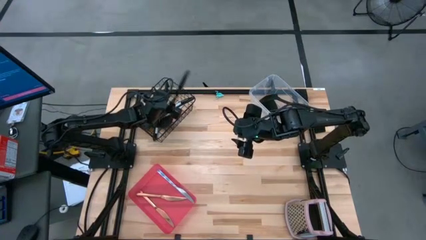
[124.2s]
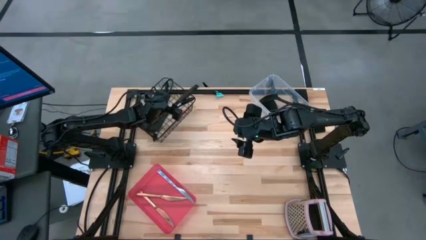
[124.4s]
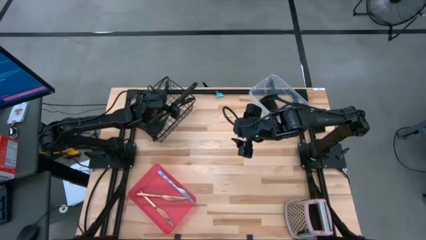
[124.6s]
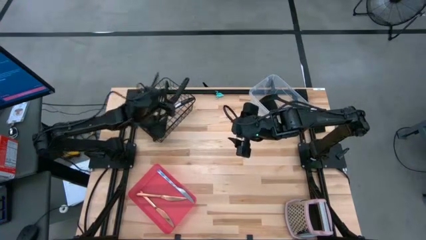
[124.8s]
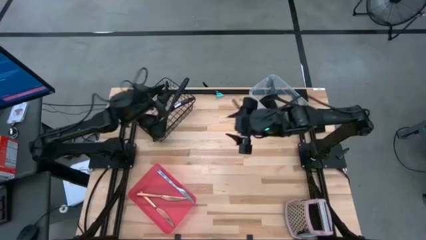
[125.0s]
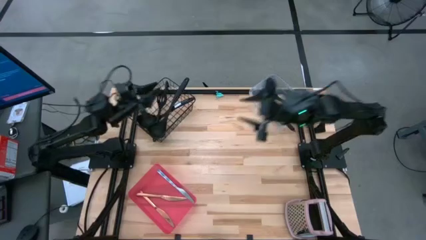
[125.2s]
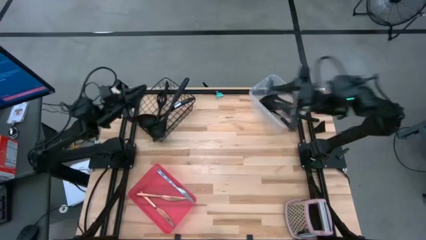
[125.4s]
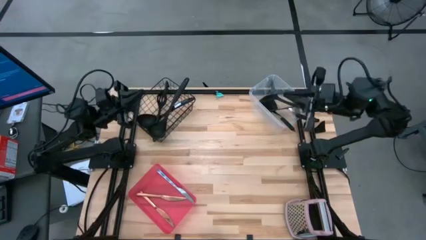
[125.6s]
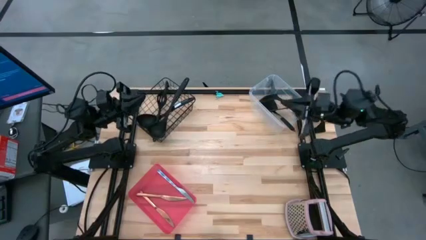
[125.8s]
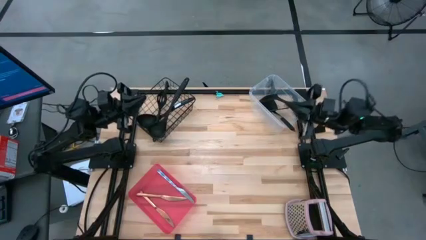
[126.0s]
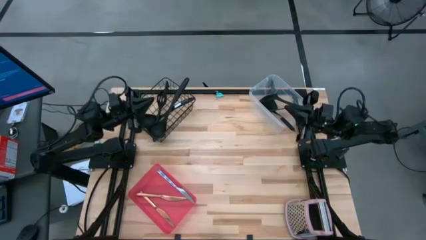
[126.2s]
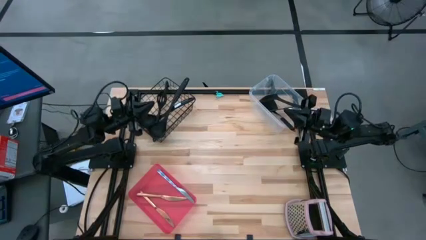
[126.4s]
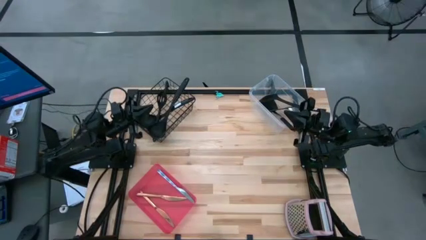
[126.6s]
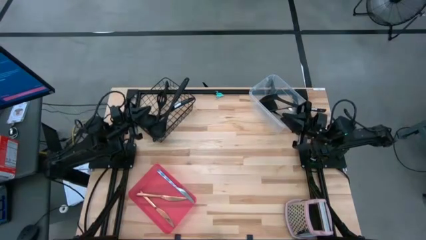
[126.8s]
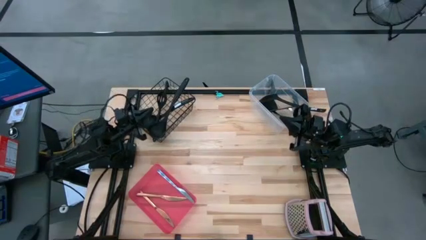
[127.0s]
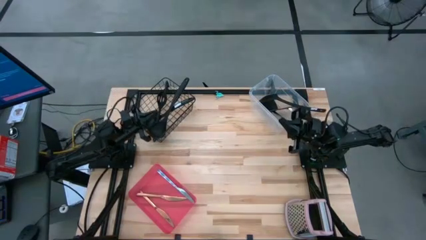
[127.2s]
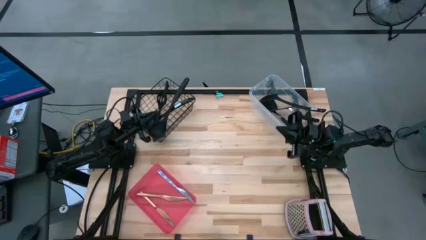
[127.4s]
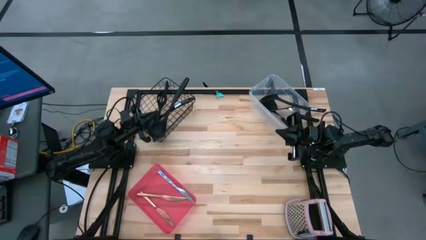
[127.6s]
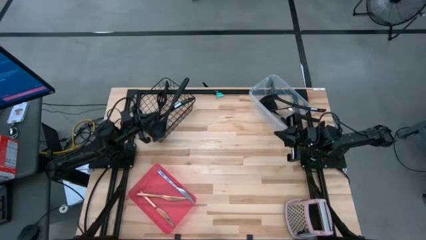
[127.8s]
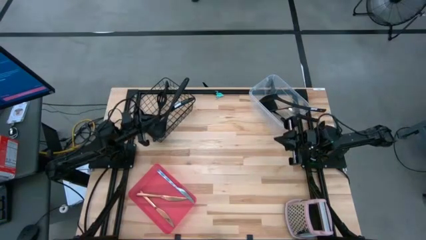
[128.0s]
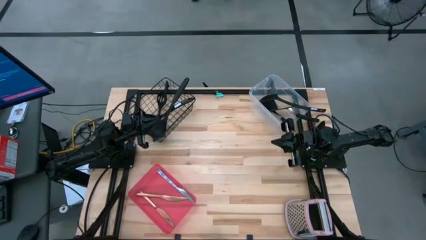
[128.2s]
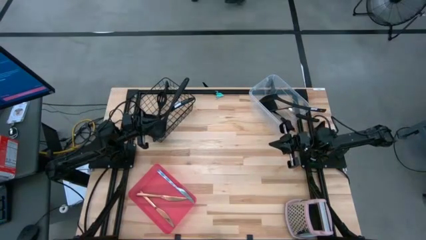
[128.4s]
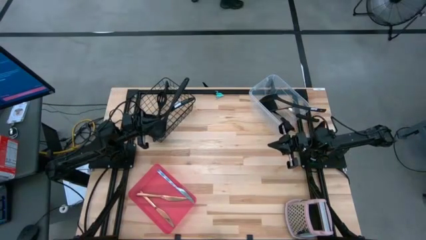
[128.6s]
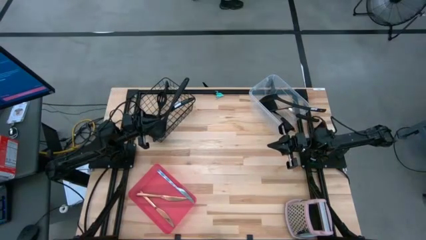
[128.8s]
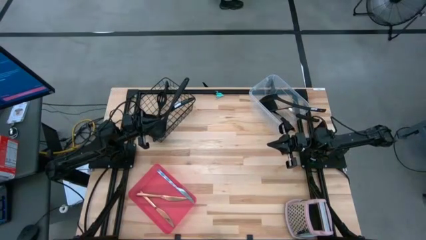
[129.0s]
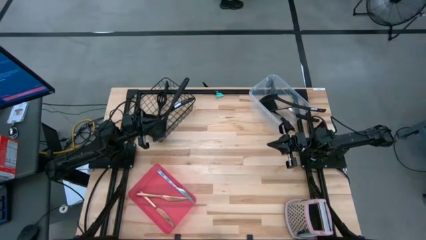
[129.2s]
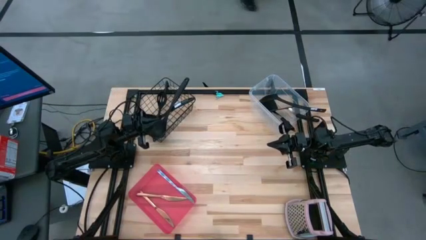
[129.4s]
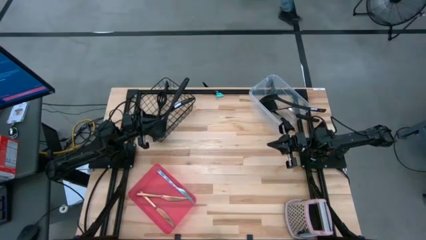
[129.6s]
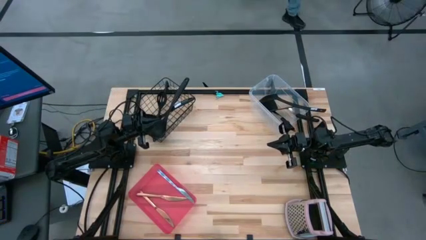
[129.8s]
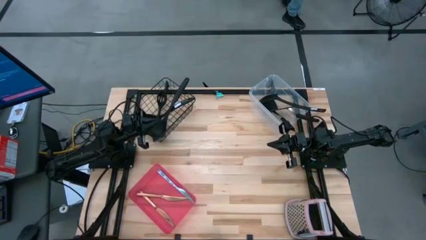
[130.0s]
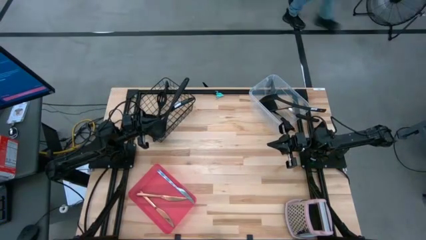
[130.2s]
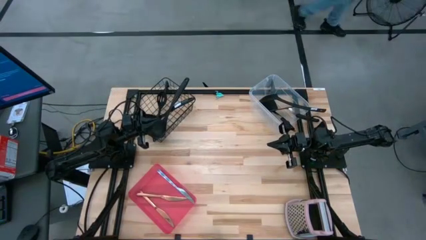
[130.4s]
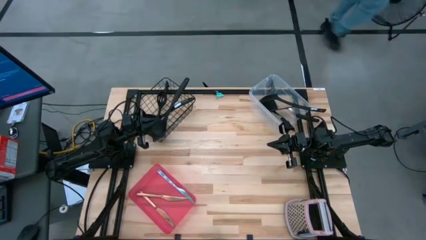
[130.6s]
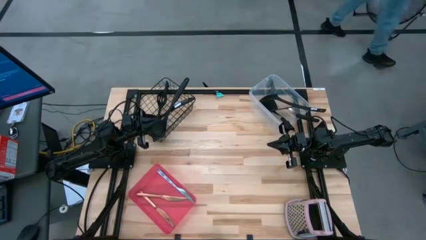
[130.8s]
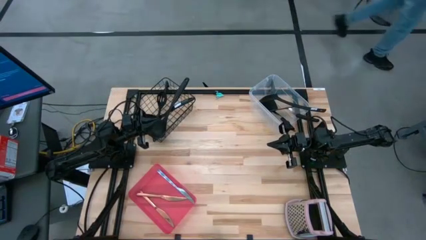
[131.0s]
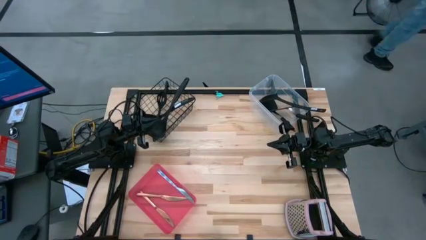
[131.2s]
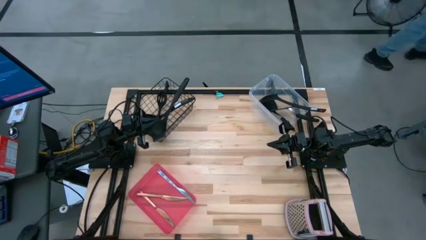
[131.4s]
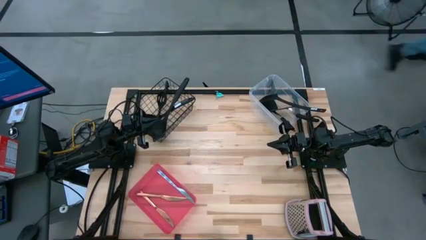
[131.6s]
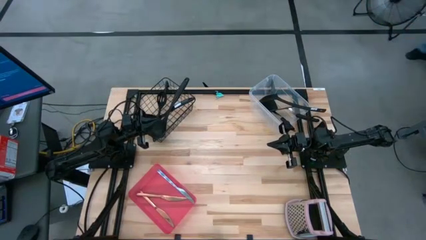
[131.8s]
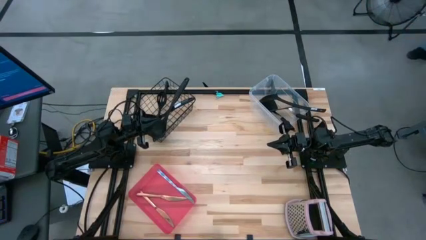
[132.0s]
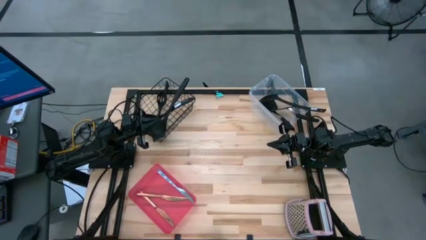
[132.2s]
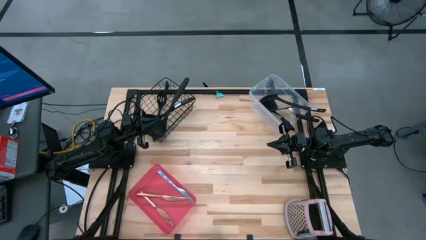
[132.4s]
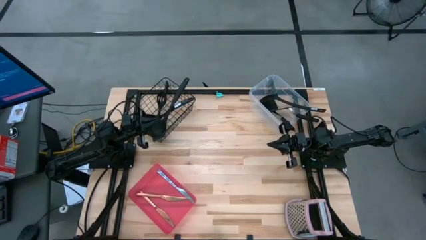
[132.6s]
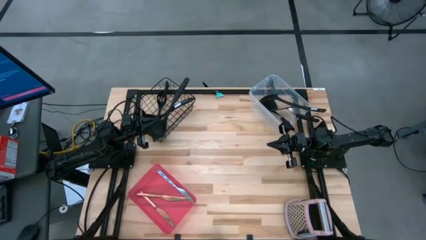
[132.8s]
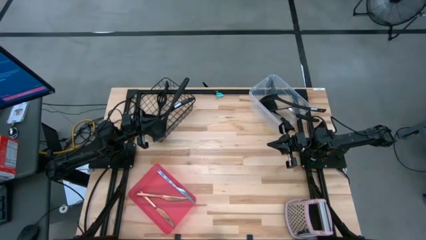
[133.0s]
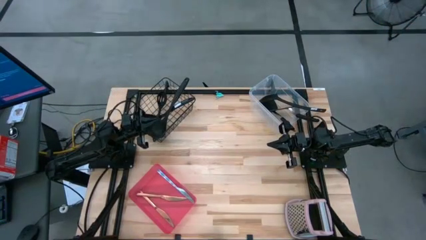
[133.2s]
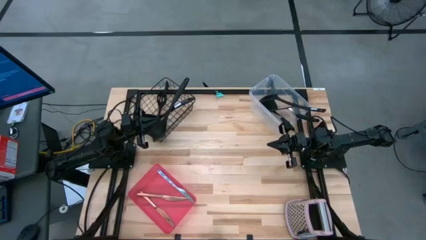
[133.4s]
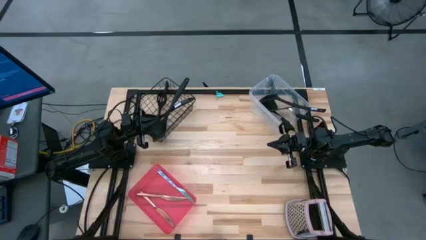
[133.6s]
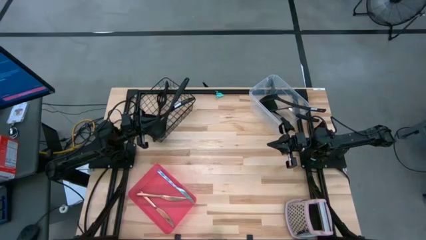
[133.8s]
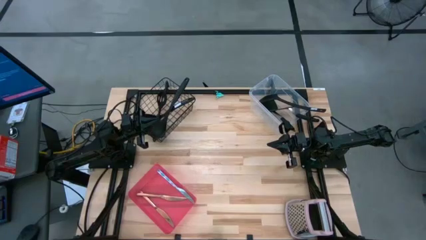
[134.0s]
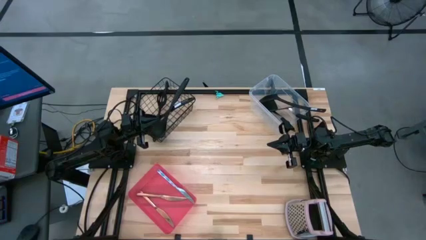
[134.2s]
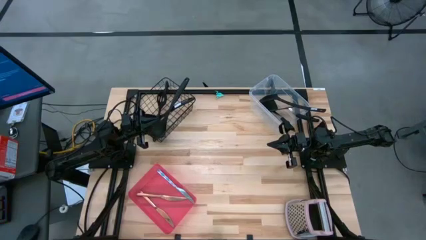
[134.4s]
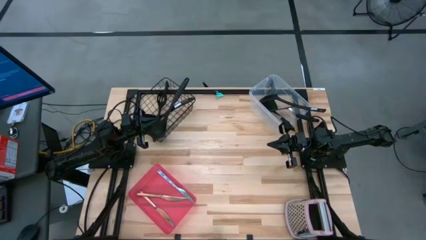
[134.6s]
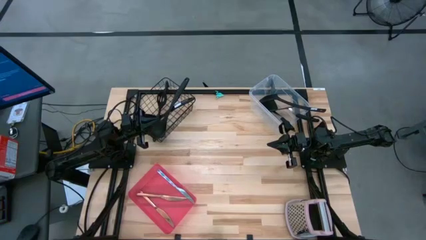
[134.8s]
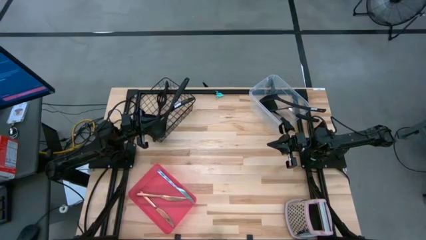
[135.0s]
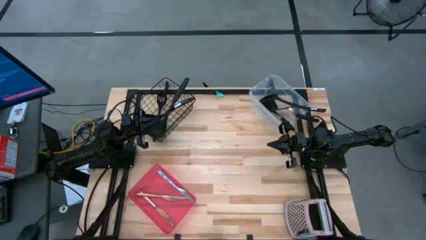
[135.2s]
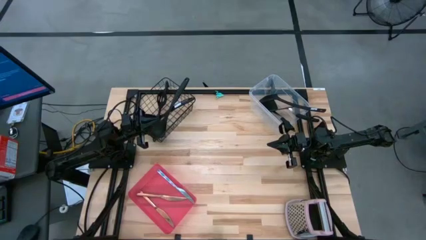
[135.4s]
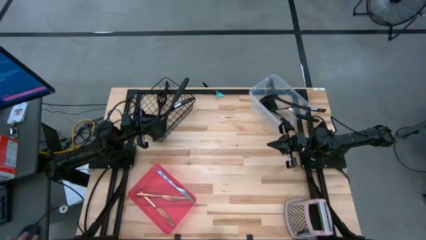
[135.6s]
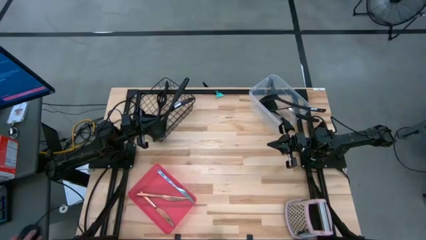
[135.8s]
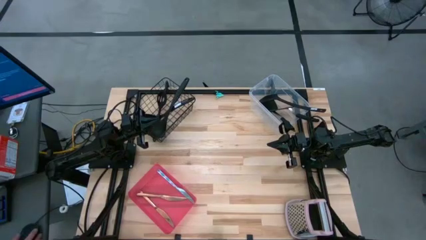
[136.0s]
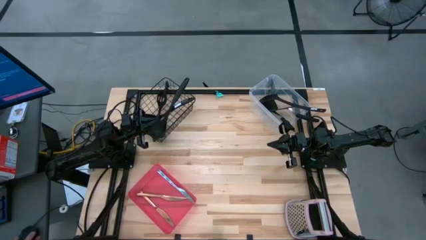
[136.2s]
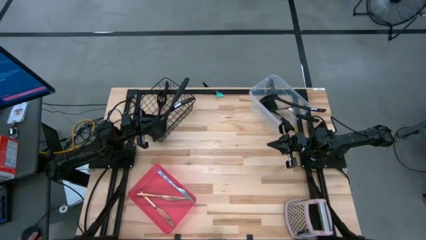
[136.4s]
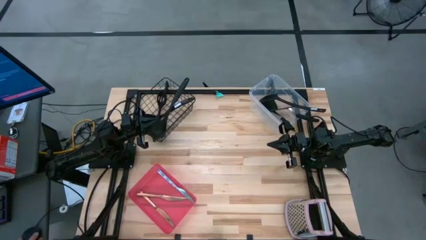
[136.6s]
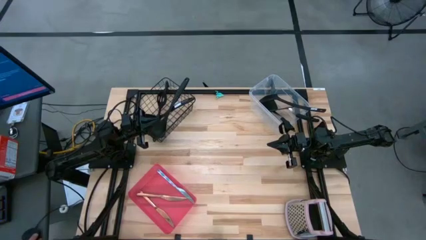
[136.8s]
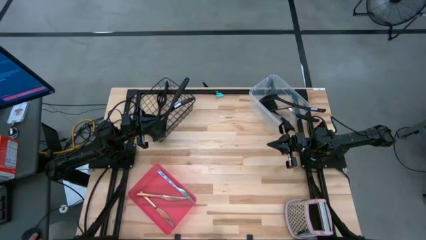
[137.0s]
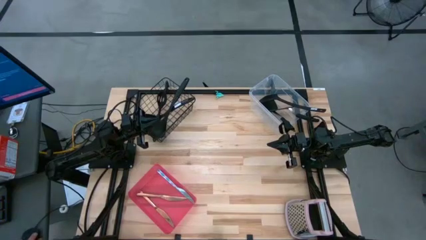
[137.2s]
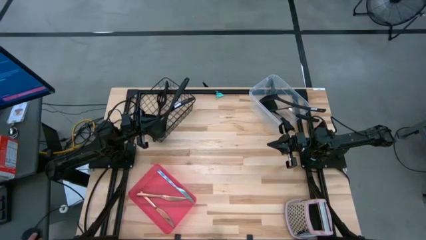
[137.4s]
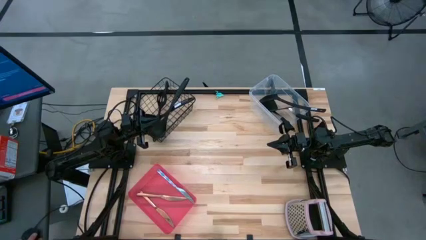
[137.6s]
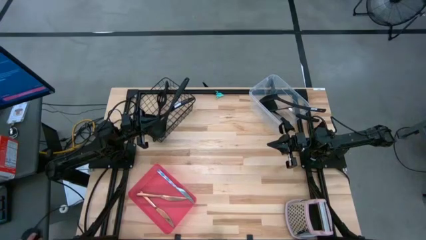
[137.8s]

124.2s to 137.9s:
Task: Pick & Place Kitchen Items
Return to Home Position

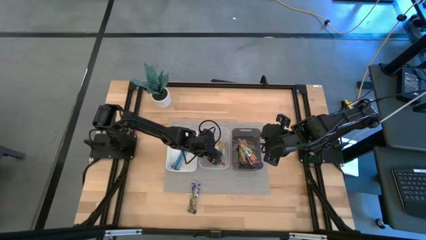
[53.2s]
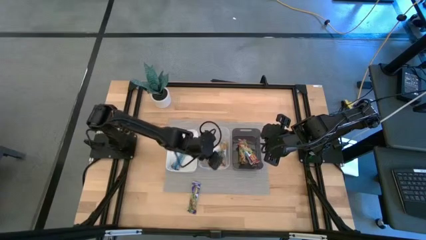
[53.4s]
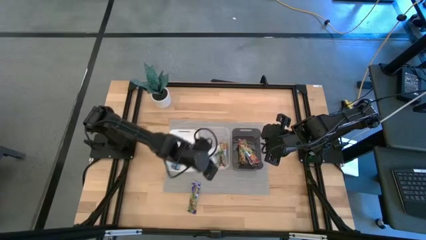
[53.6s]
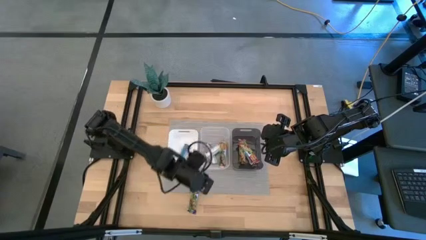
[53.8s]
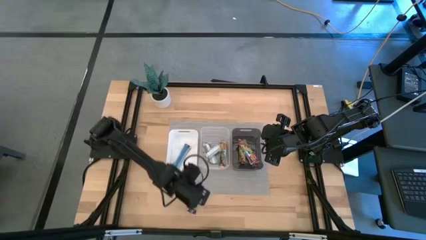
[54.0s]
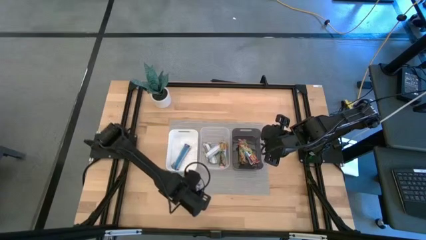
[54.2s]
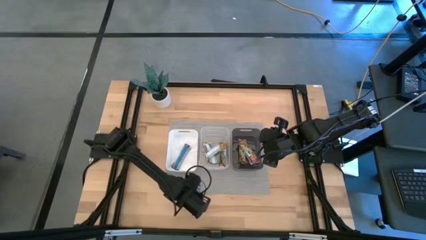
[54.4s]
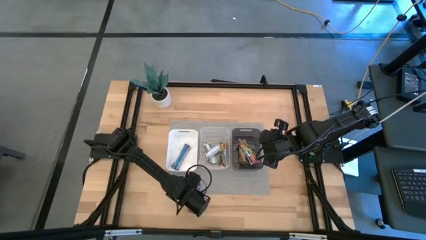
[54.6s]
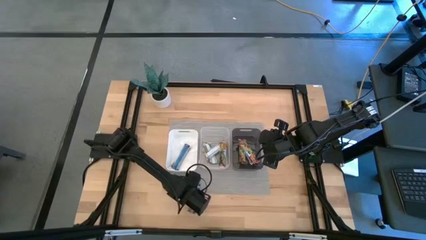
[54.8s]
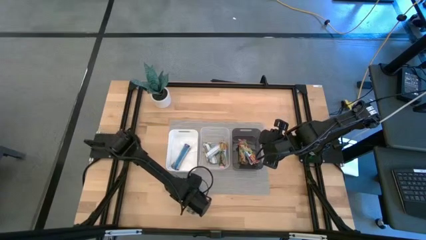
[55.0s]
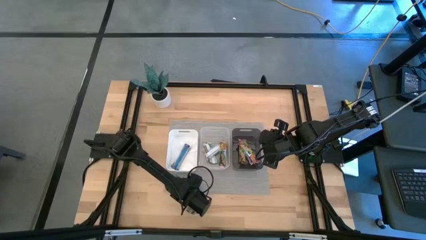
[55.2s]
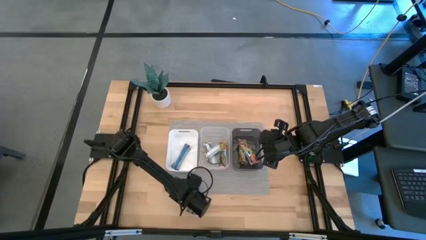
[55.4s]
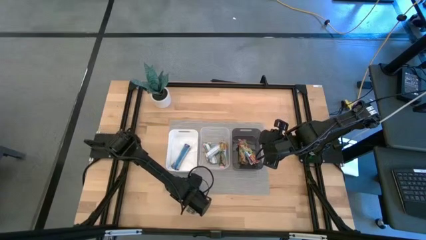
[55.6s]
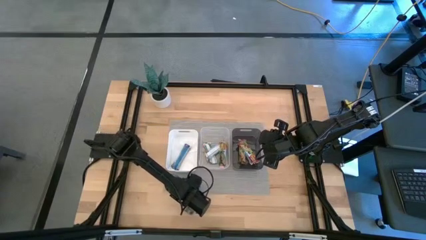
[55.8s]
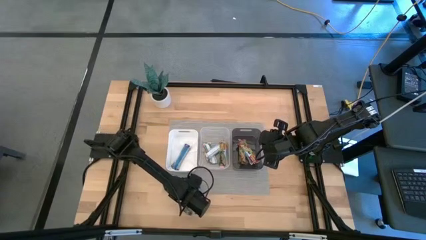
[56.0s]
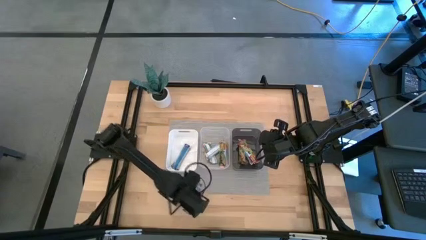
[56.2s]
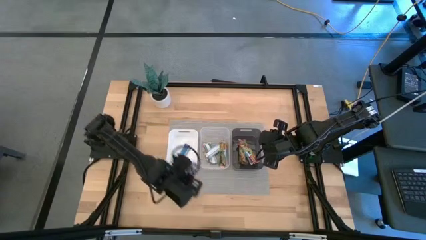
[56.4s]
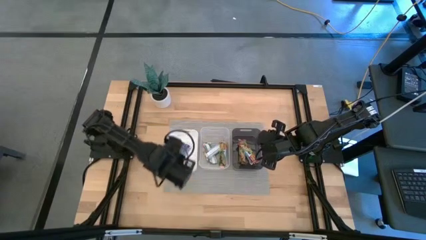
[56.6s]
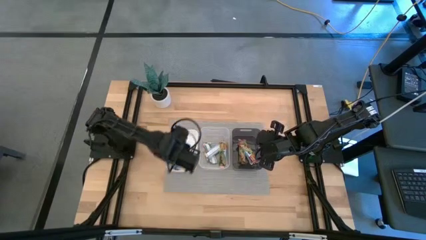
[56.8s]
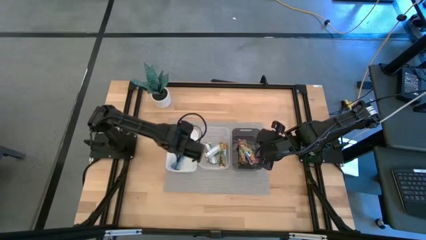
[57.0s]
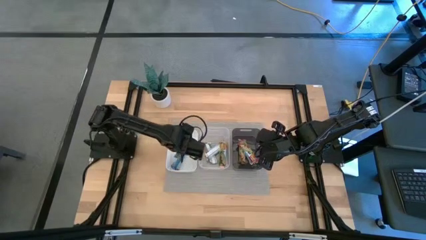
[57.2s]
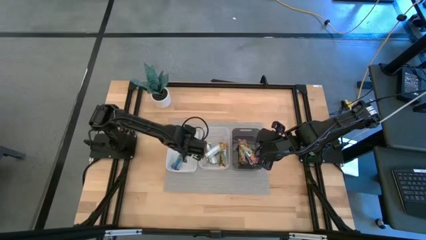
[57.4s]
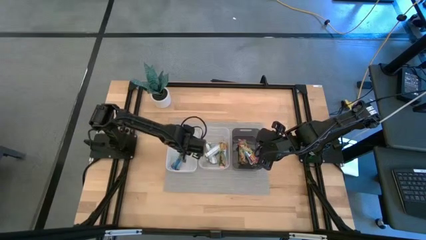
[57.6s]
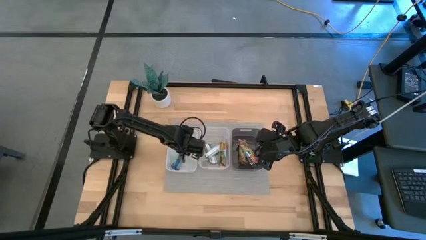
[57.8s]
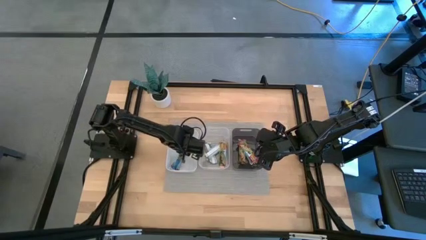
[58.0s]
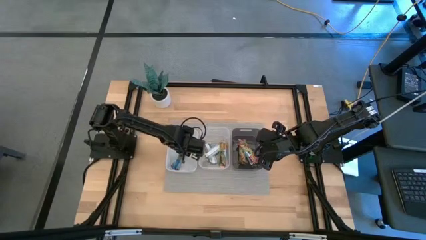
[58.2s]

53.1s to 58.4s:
Task: Pick and place Granola Bars by type
Put the purple granola bar into the white bin
